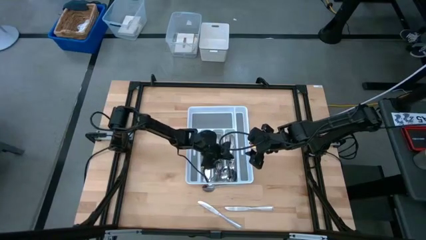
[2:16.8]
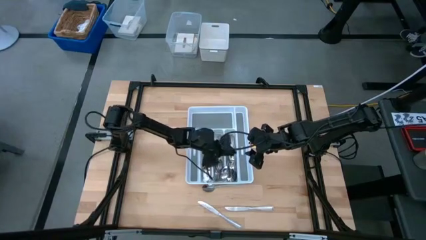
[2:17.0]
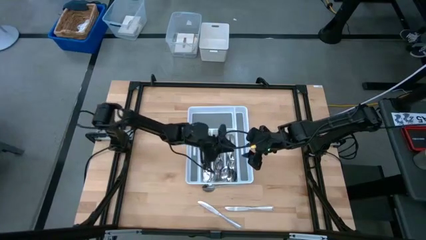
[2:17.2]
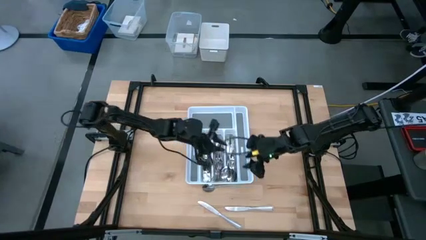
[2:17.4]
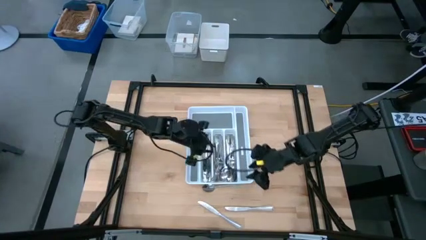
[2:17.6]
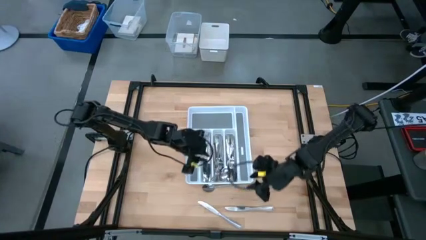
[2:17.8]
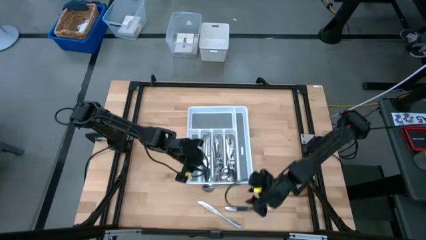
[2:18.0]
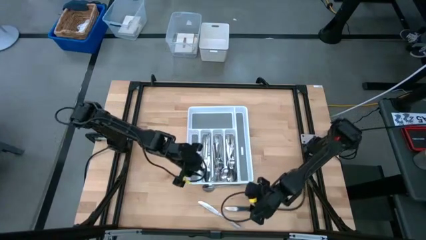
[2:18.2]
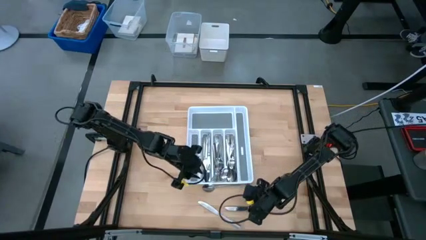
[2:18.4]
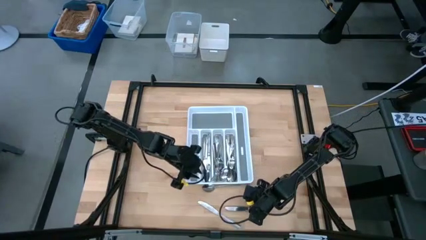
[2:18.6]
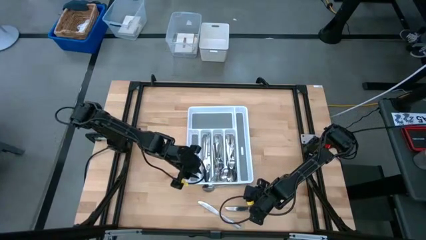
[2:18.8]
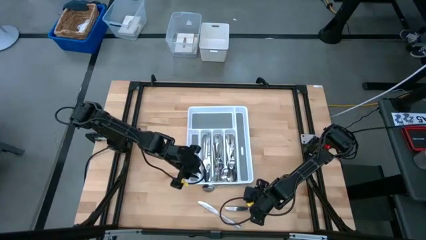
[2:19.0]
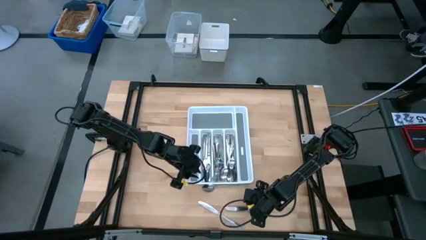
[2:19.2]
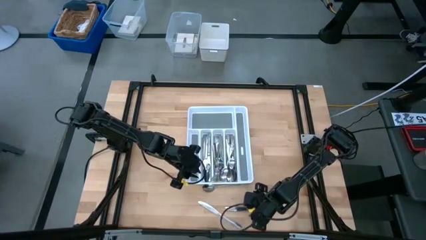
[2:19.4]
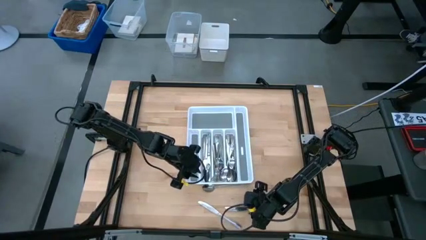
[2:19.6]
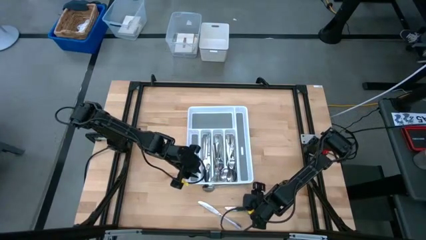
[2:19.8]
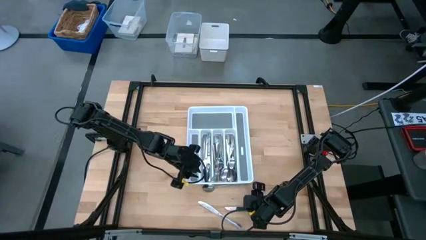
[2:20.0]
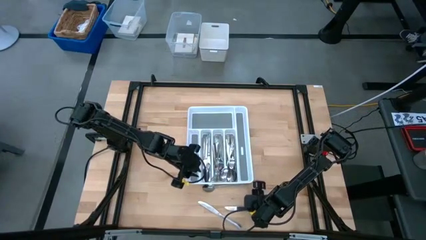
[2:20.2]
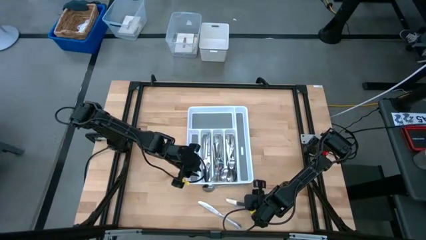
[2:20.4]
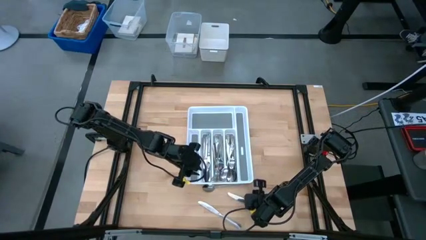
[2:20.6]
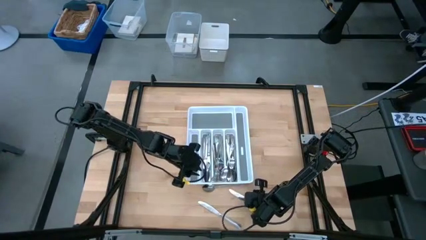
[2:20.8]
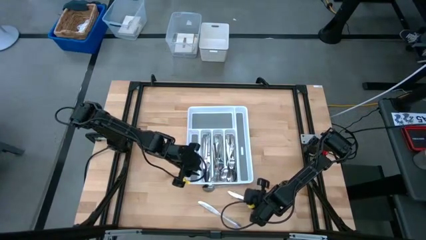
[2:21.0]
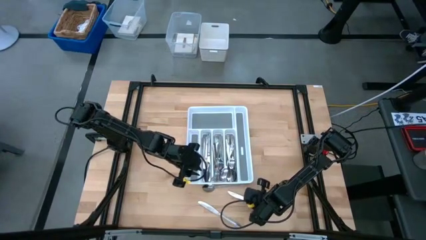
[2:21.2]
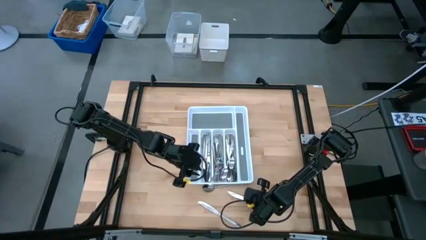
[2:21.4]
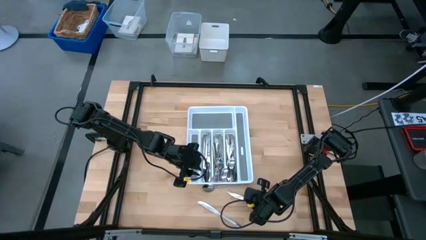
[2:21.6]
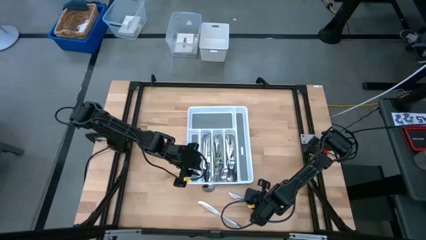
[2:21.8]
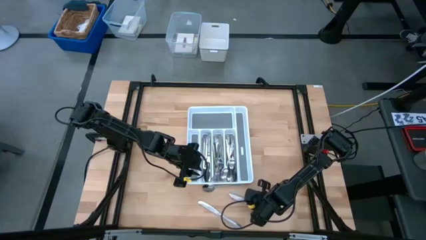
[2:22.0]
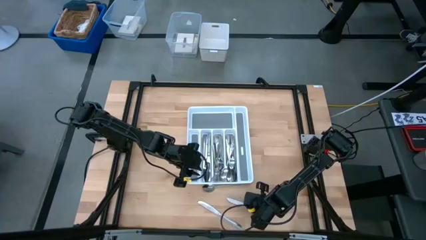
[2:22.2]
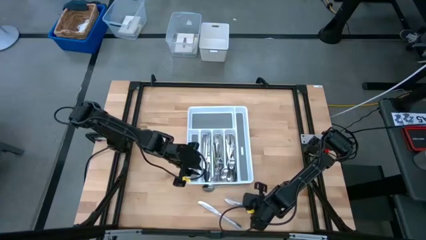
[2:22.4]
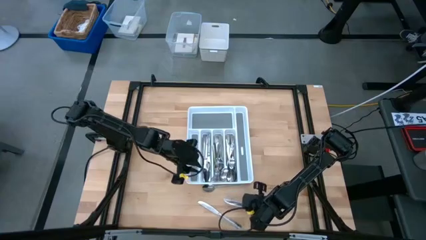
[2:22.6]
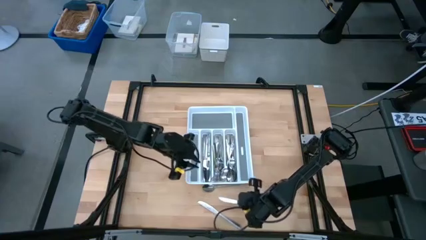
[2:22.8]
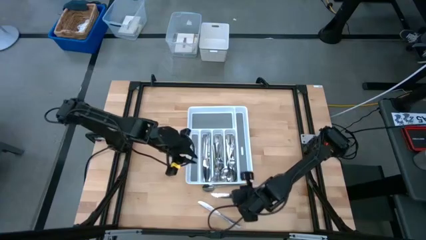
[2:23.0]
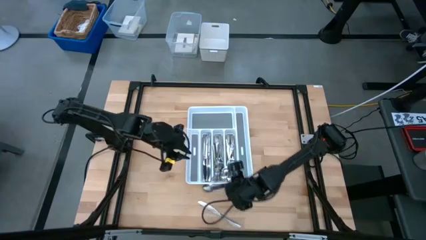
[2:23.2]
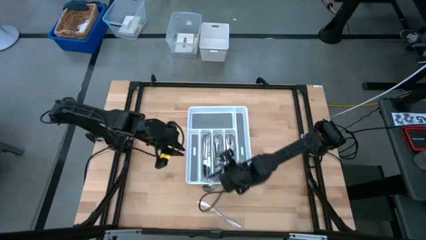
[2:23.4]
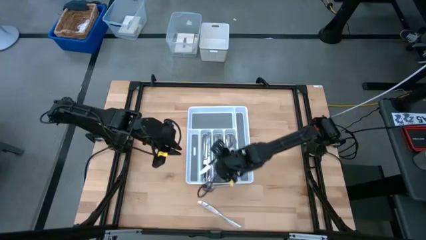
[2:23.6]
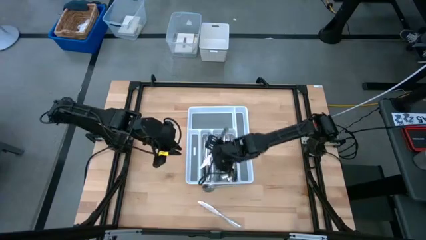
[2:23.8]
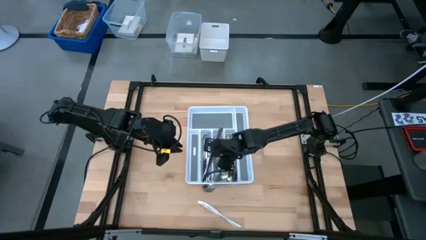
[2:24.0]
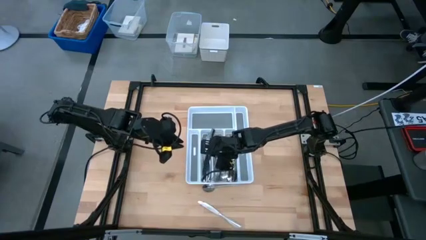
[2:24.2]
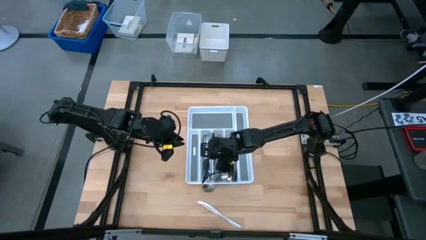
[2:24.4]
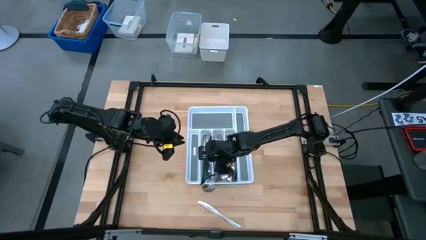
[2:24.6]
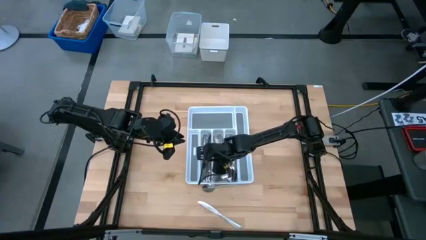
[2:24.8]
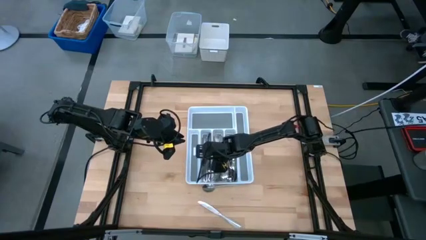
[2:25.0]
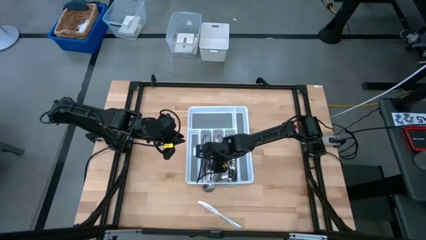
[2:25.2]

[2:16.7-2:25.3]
Task: Sort silverware
Put the silver table knife into the white cutlery tray

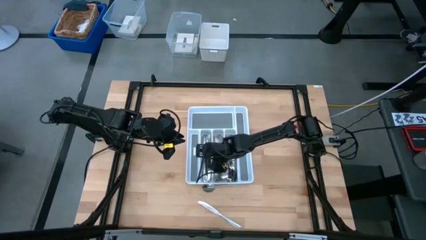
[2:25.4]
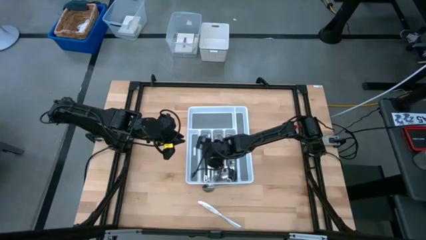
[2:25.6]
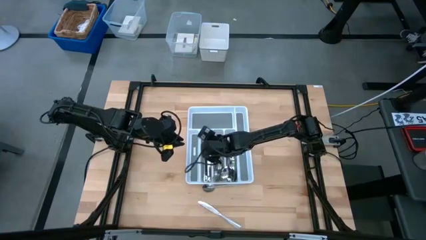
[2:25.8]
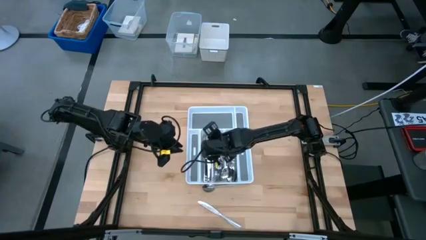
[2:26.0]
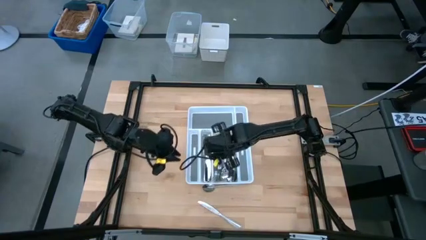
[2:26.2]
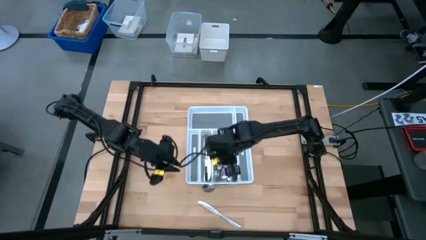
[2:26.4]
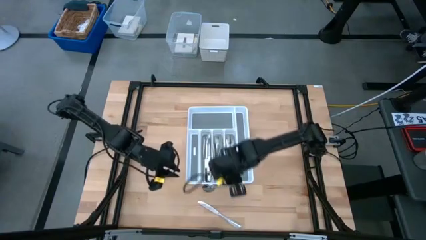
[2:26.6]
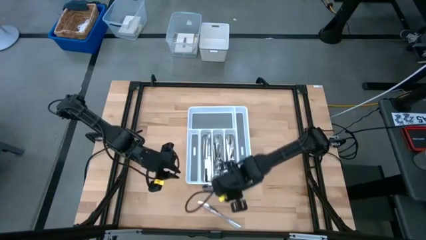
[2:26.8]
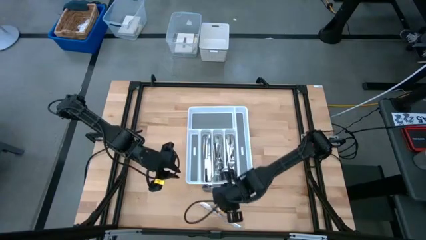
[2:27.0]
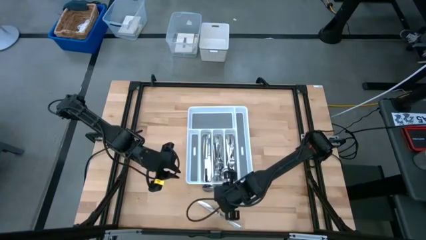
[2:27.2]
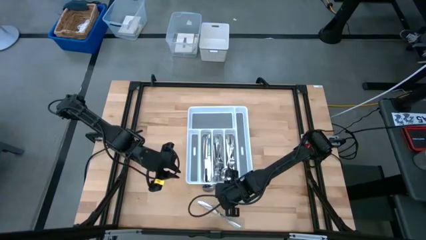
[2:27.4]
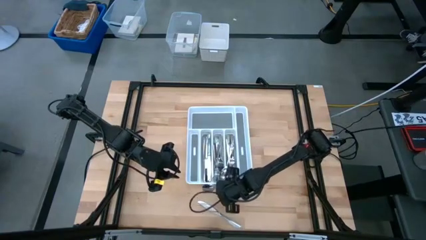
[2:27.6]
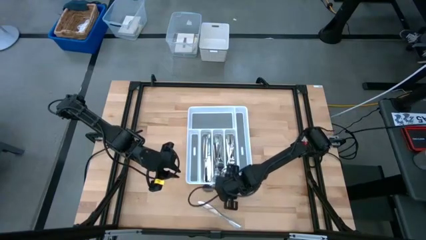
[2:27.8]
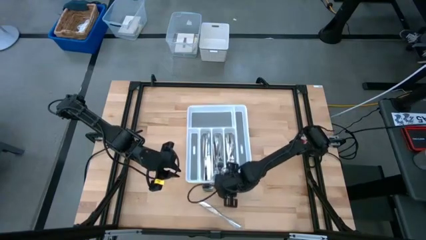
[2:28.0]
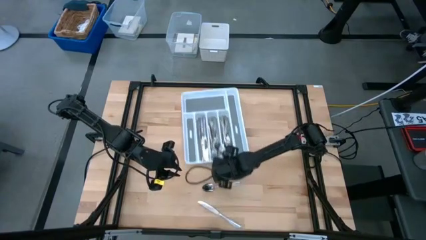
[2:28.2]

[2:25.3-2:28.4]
Adjust the white cutlery

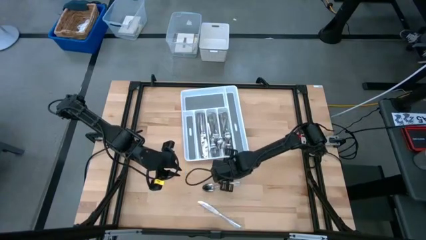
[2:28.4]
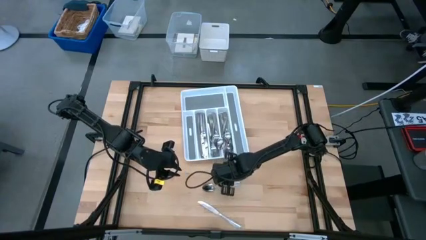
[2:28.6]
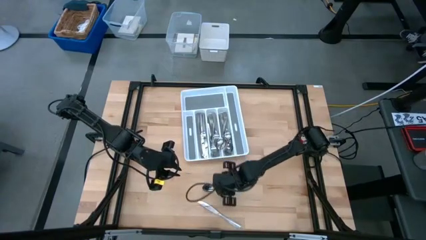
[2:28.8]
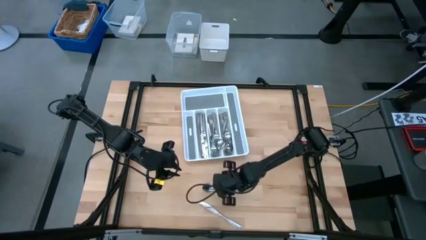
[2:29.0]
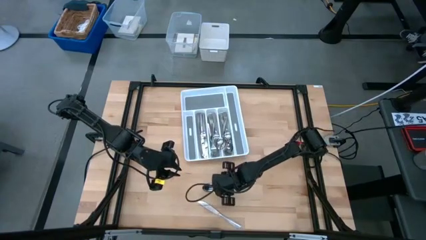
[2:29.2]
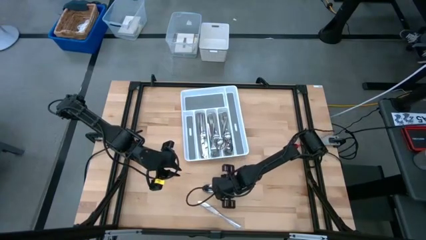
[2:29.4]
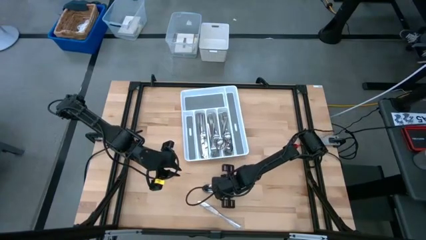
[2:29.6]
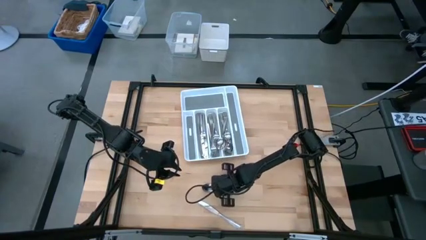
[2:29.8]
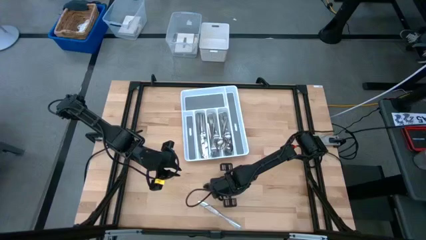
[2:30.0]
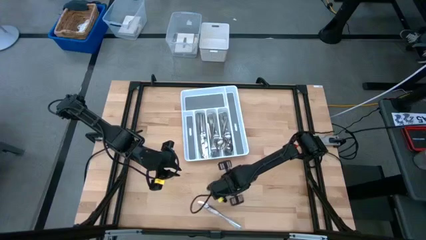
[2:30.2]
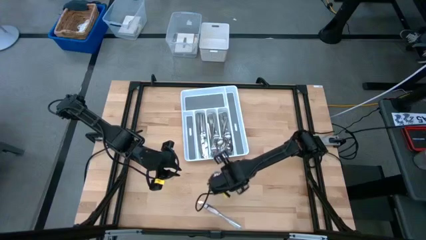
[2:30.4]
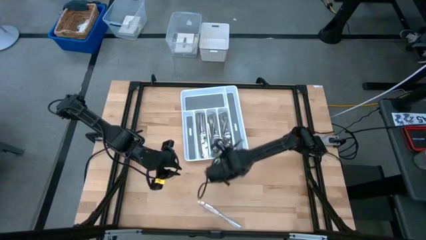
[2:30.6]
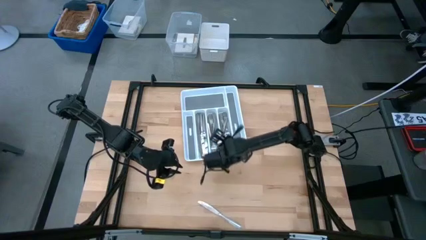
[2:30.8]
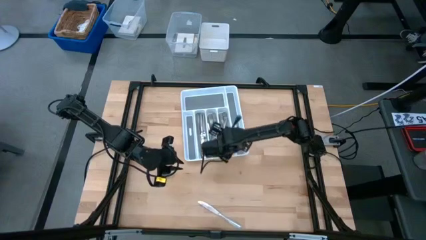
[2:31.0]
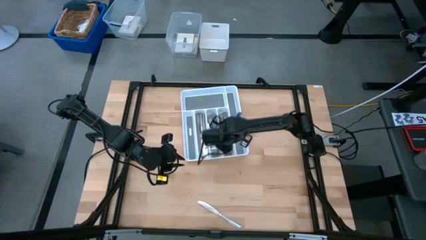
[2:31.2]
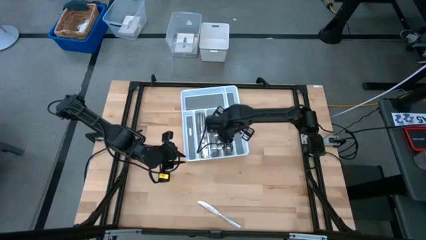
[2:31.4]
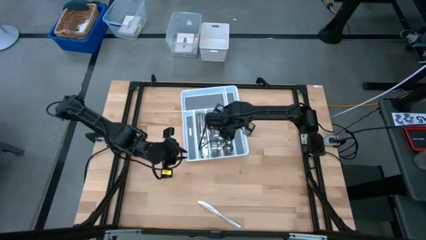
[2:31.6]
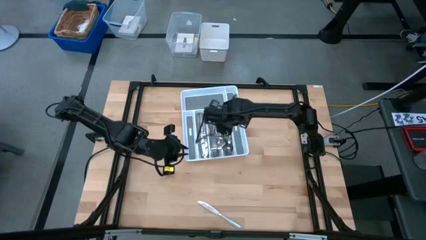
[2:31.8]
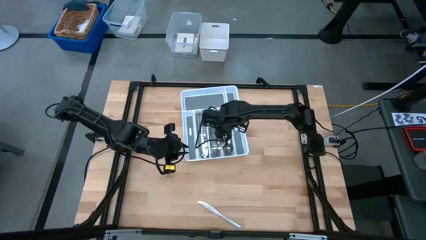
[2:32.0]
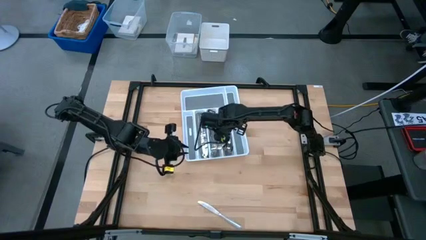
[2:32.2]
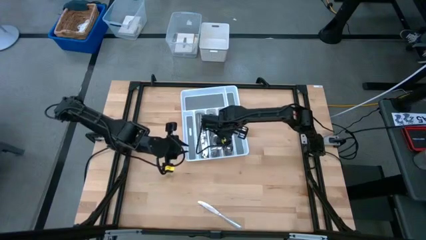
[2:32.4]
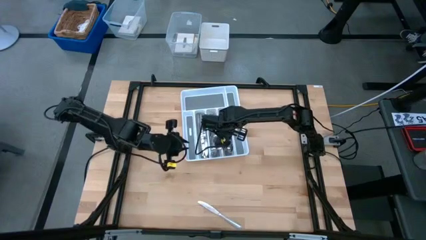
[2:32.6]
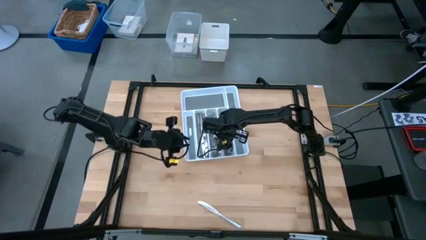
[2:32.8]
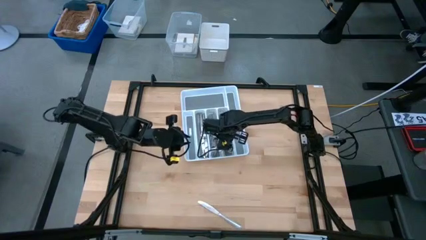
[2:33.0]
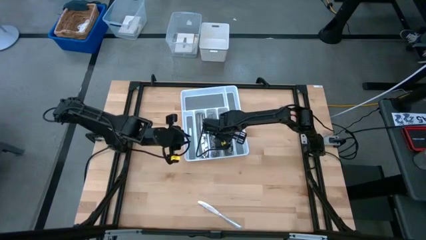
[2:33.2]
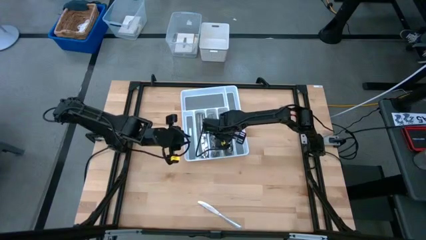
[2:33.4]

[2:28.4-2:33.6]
Put the silver spoon into the white cutlery tray
